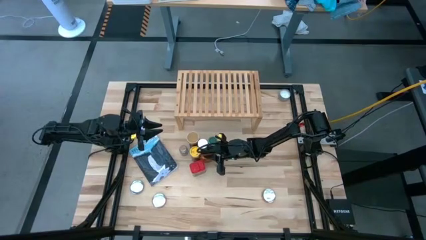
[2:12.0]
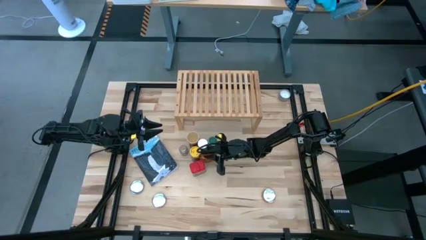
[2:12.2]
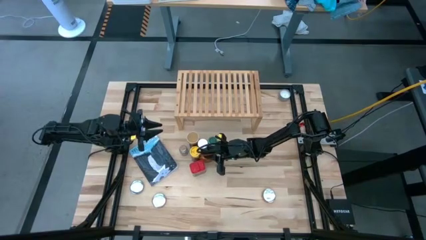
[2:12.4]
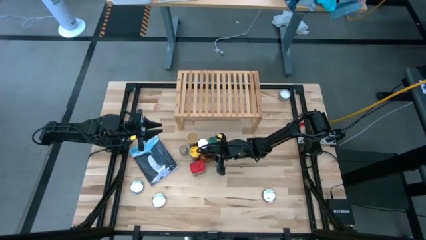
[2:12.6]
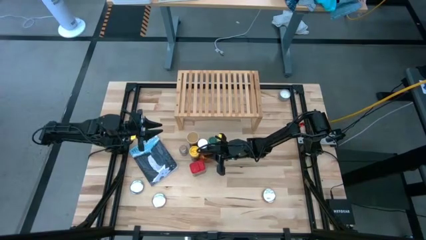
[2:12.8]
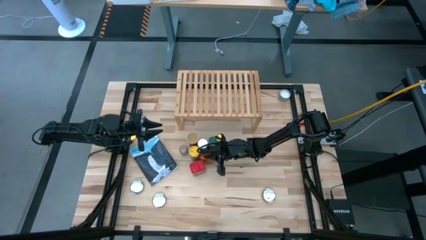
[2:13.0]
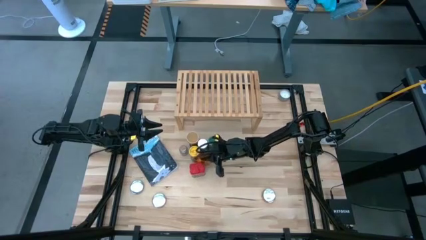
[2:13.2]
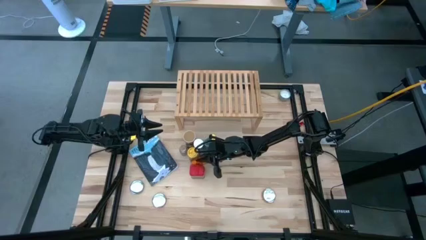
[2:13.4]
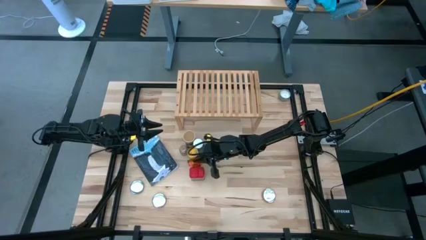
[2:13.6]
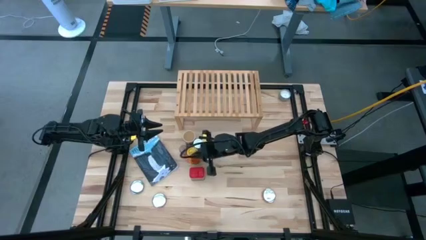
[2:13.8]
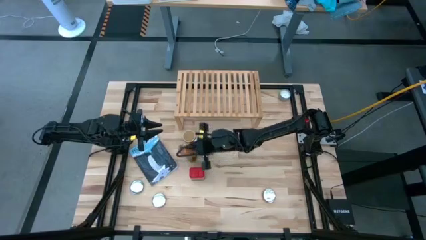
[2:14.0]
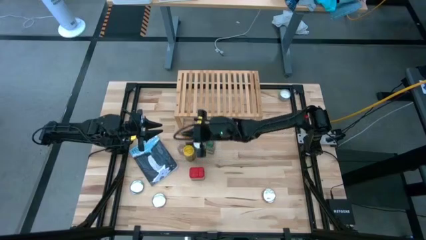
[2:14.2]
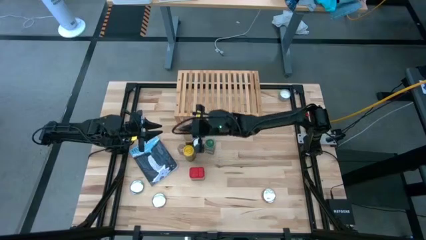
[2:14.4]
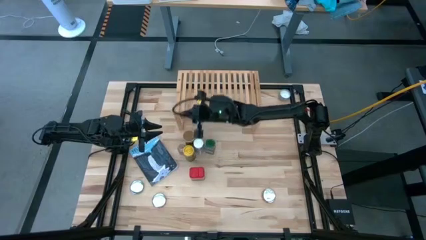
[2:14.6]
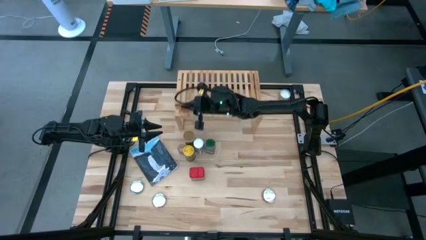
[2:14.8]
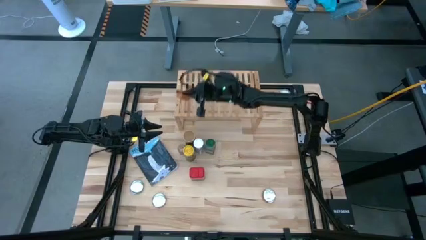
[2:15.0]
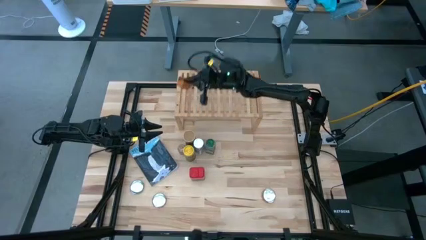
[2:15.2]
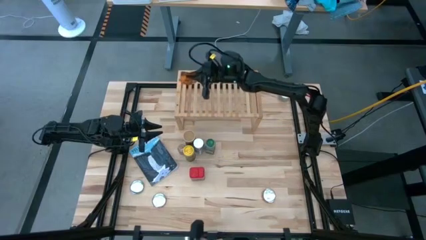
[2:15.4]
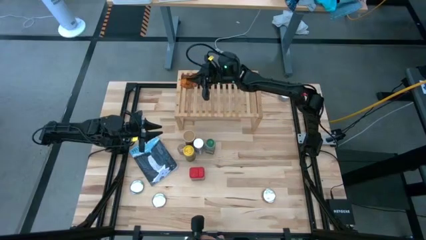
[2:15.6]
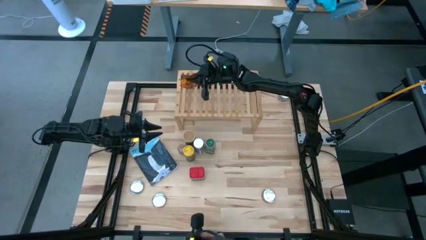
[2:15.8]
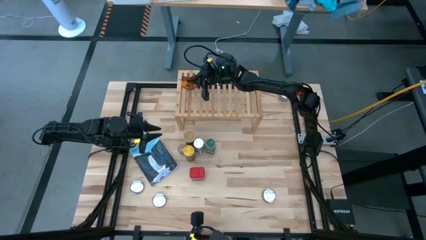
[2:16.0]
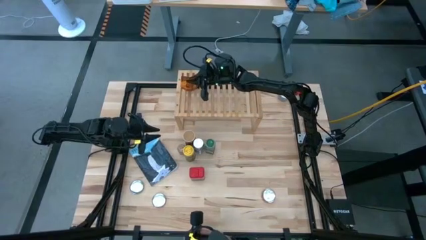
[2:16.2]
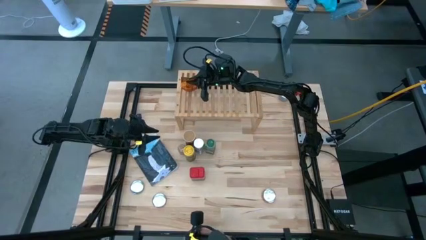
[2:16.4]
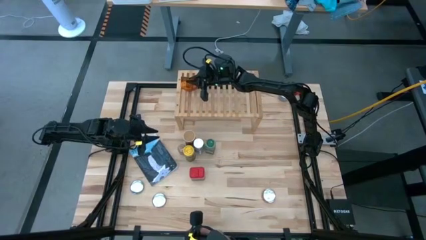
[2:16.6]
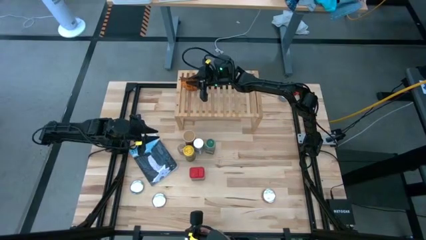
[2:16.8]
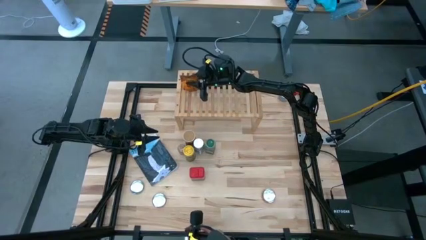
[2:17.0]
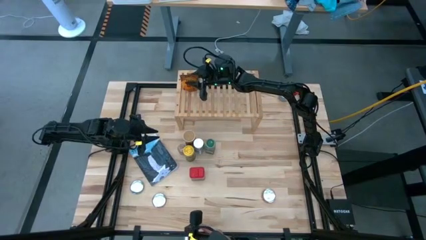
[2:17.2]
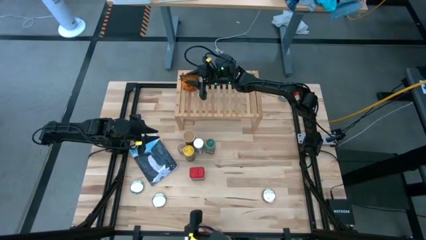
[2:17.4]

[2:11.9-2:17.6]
Task: Shelf spices
Put the brown seasoning bag on the shelf

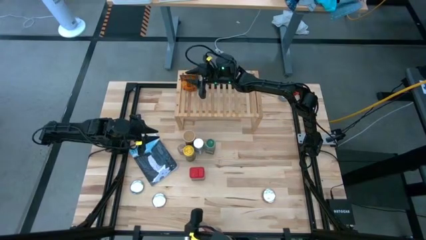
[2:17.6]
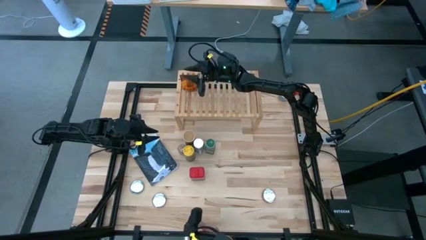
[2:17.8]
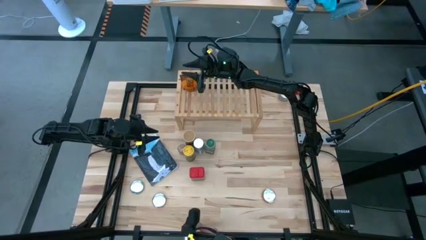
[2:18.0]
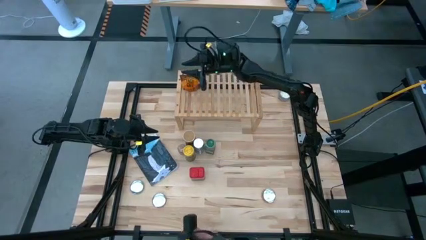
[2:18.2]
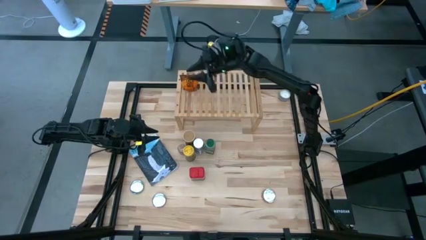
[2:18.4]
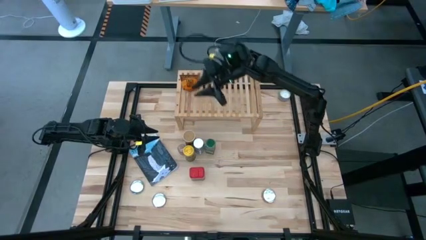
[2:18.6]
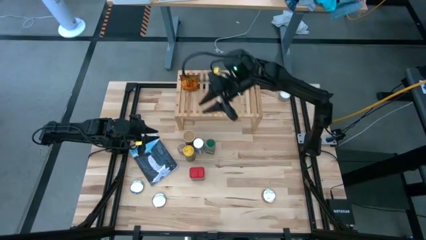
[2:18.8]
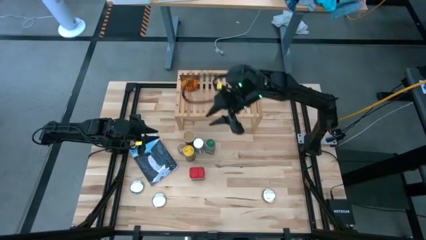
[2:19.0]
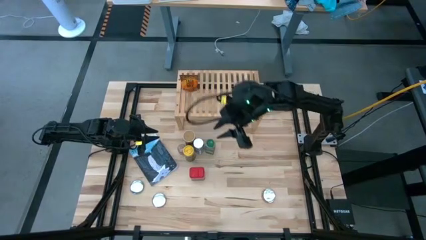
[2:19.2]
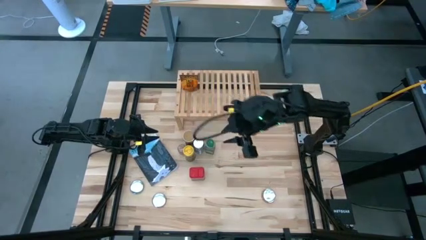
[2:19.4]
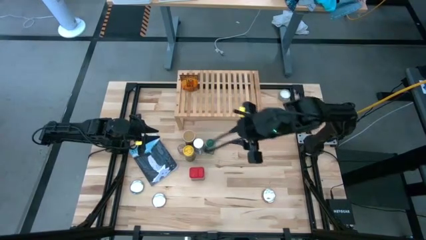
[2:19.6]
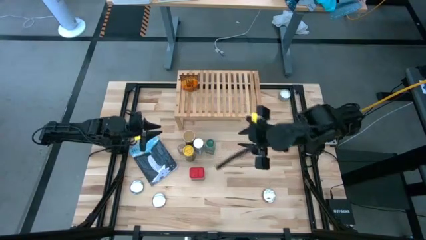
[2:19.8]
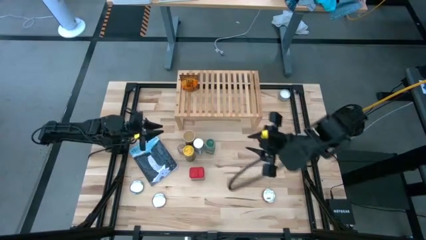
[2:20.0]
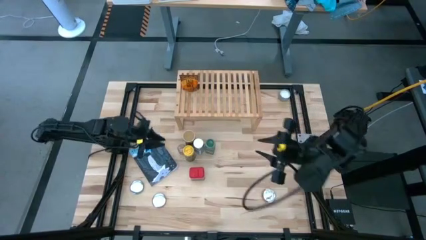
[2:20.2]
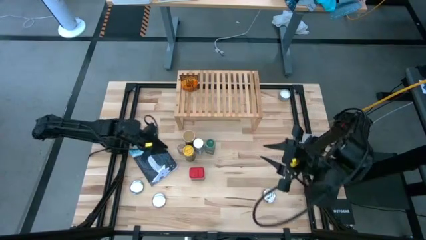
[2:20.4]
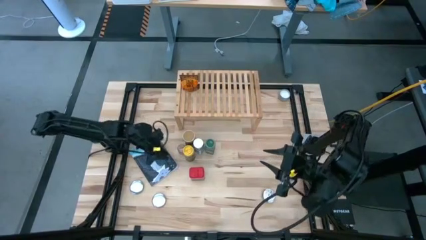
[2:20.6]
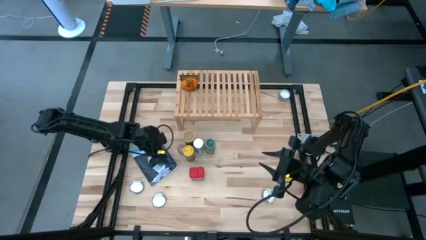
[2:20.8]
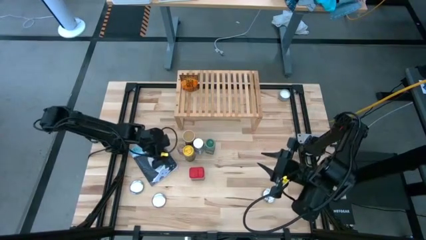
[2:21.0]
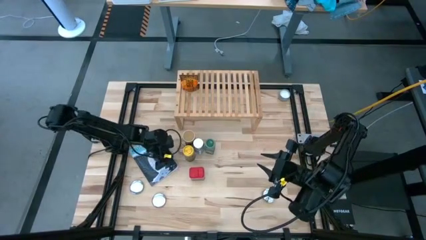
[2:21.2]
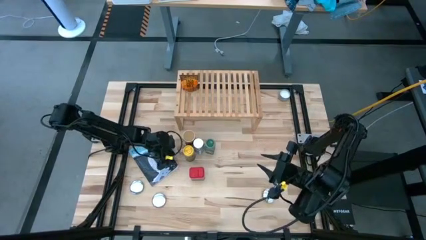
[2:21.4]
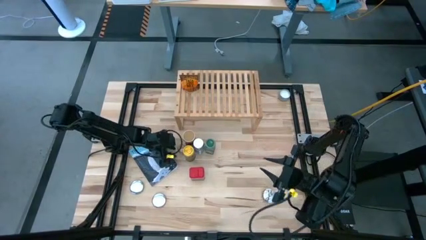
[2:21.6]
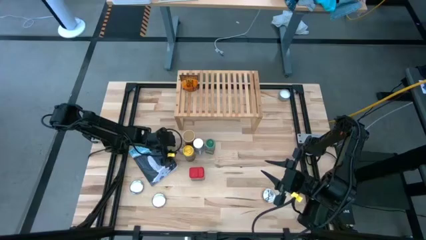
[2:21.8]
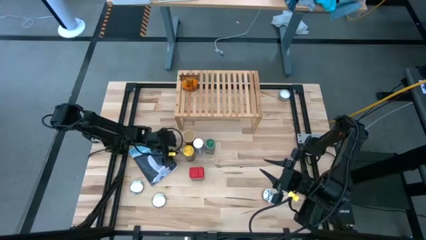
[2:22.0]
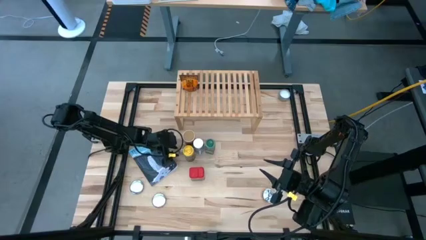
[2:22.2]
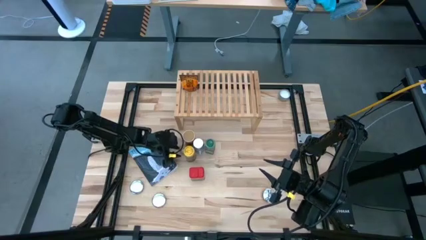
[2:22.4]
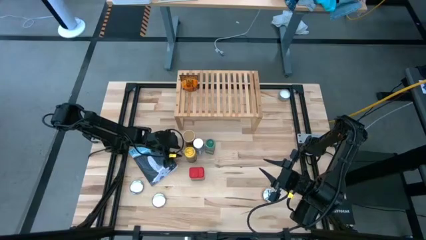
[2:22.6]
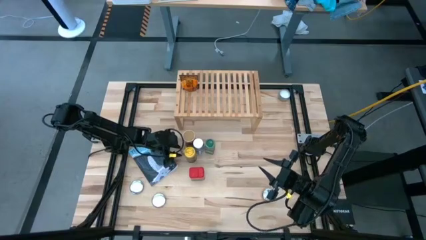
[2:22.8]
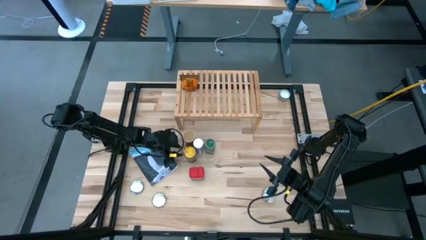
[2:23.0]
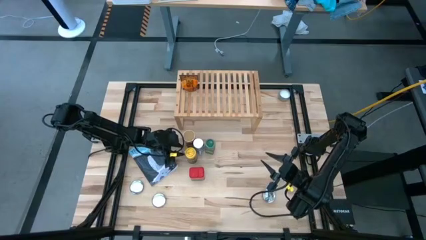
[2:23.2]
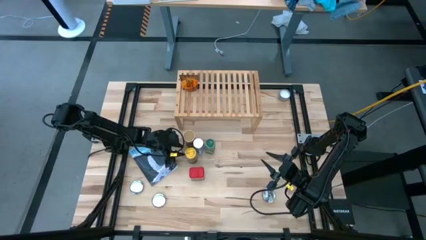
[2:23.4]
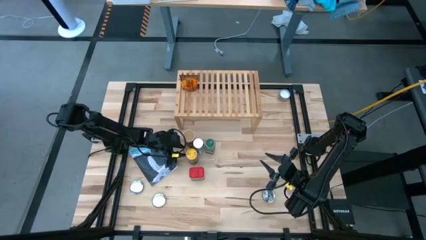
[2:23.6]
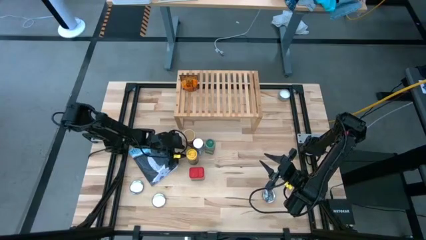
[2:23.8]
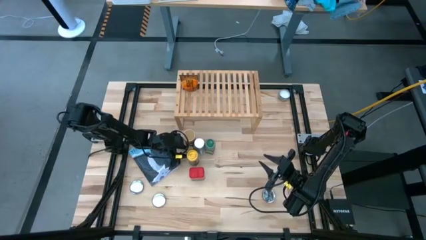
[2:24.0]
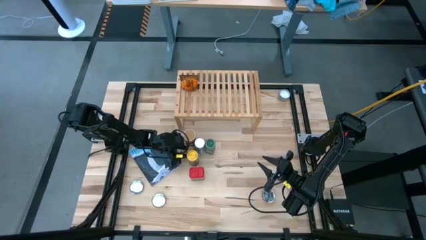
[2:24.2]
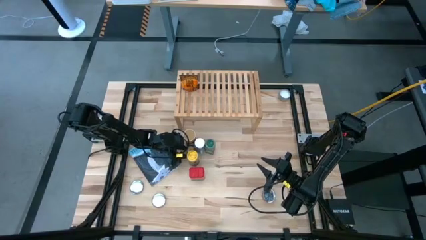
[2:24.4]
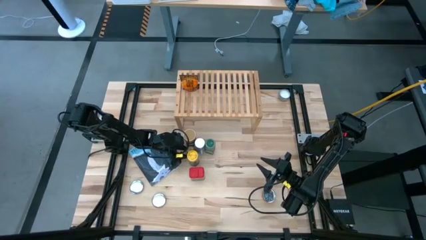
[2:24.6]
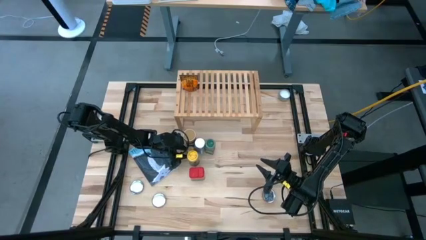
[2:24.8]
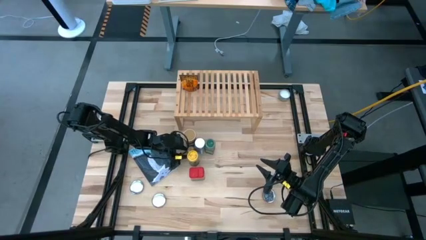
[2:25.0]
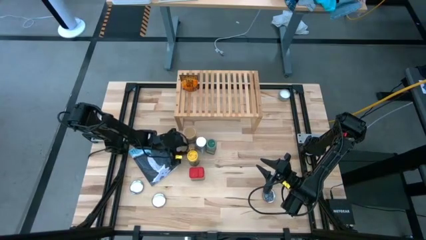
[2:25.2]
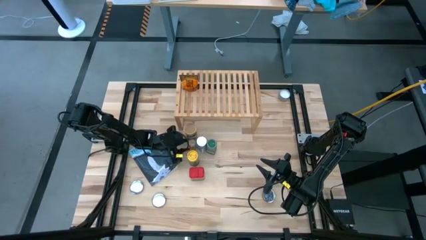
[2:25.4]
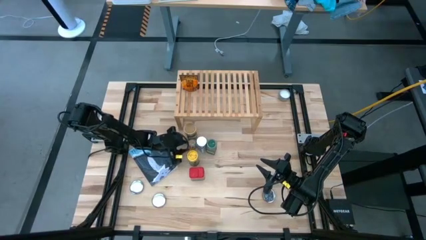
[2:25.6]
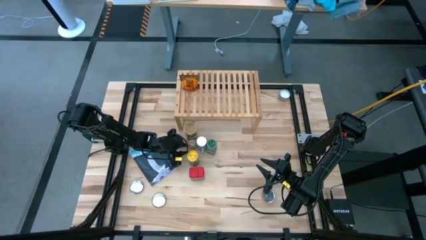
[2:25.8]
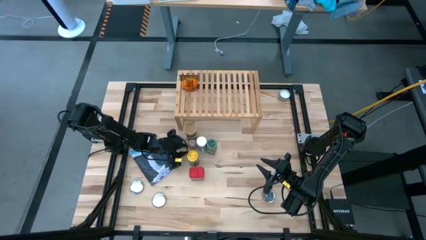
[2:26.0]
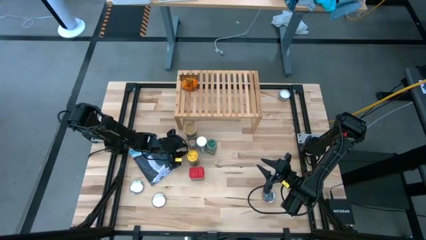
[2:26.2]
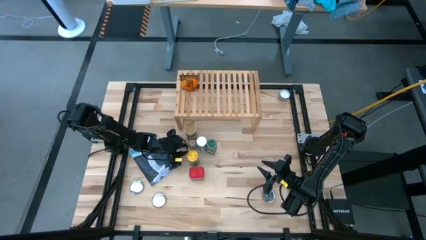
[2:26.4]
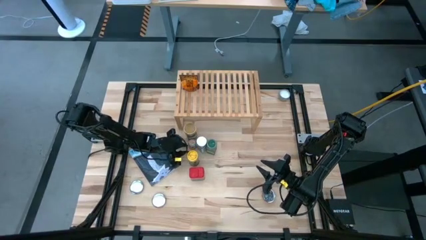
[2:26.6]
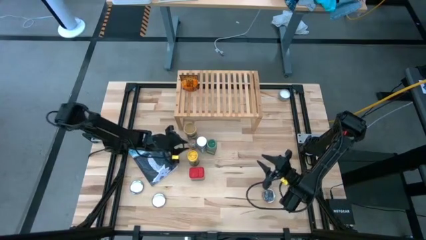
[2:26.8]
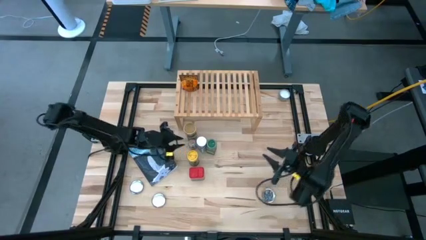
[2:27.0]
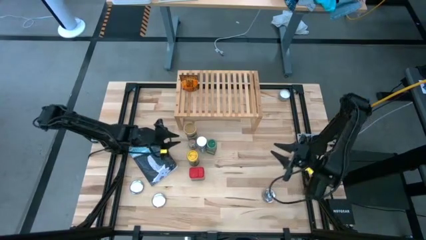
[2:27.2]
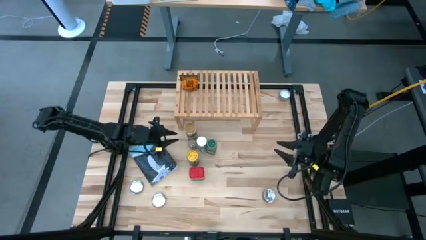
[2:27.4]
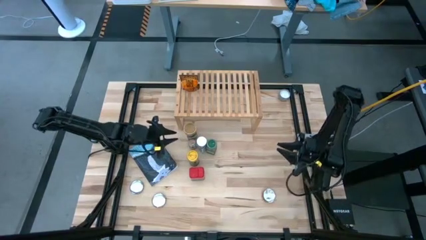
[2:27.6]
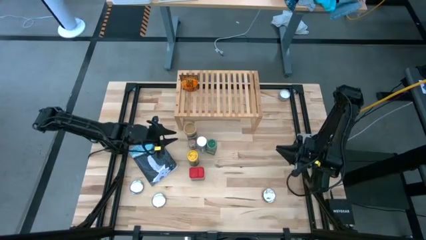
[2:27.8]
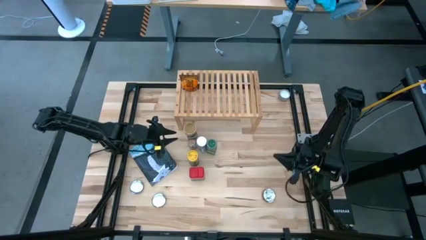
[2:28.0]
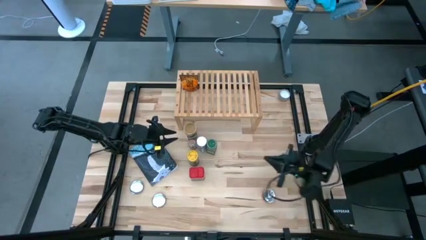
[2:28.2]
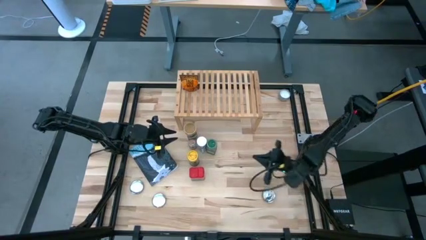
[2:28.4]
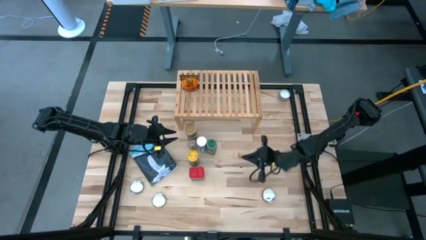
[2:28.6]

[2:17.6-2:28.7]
Put the transparent seasoning bottle on the shelf
